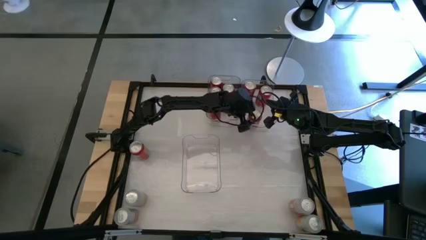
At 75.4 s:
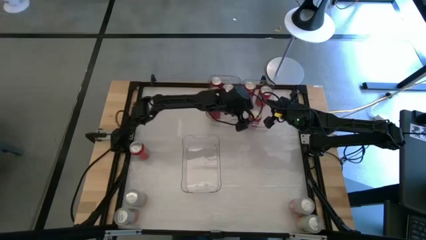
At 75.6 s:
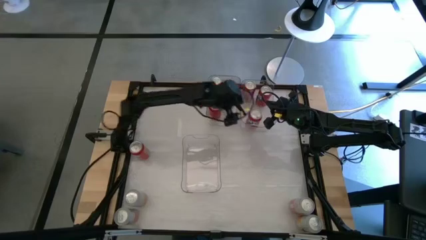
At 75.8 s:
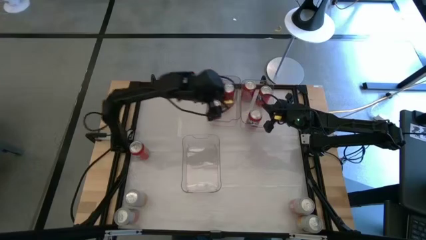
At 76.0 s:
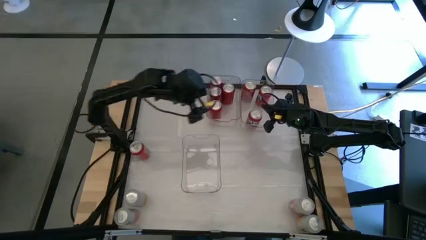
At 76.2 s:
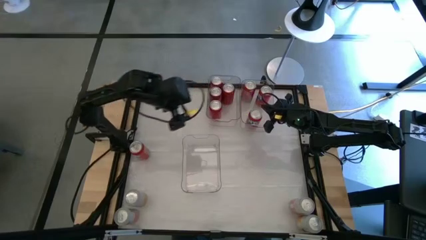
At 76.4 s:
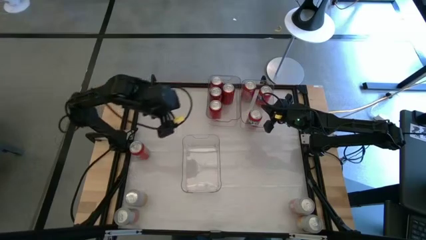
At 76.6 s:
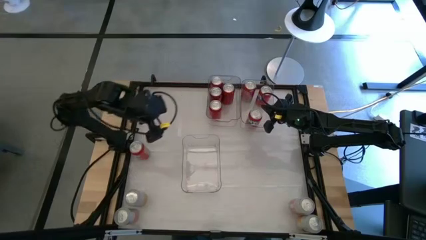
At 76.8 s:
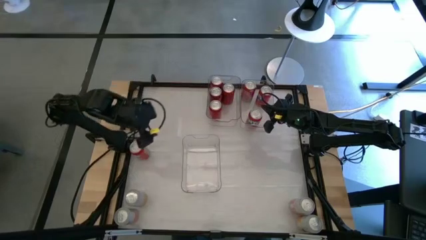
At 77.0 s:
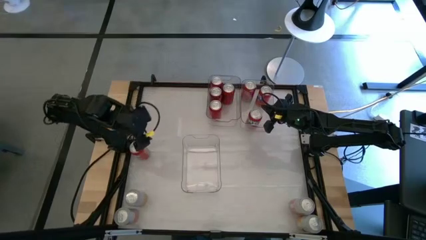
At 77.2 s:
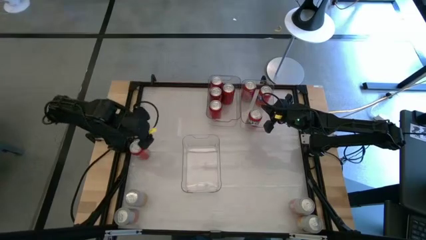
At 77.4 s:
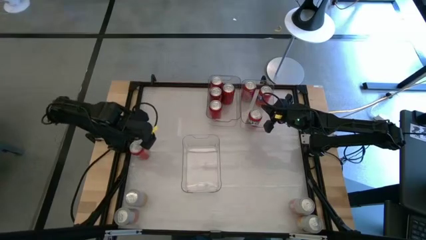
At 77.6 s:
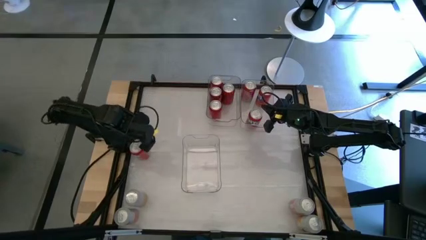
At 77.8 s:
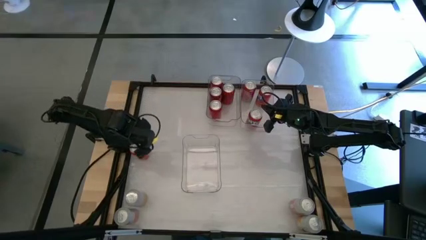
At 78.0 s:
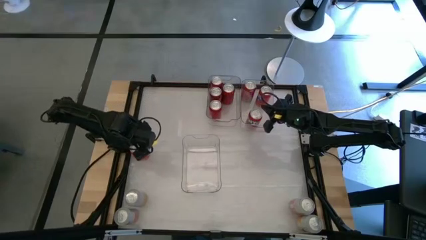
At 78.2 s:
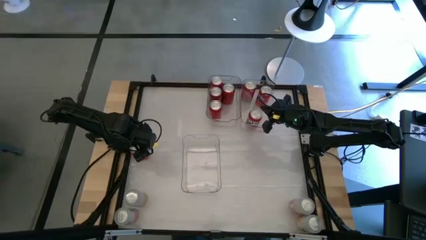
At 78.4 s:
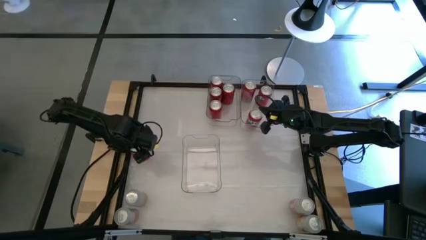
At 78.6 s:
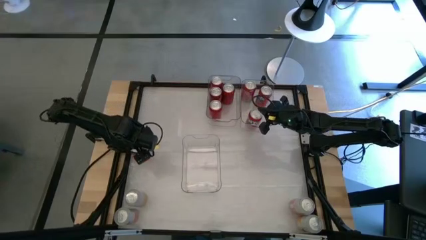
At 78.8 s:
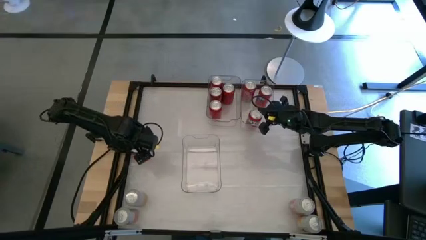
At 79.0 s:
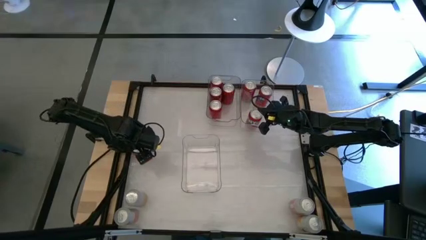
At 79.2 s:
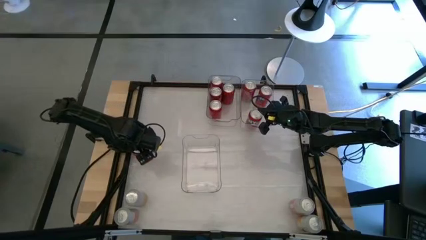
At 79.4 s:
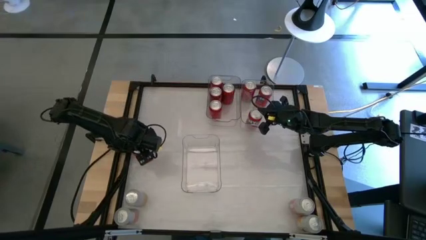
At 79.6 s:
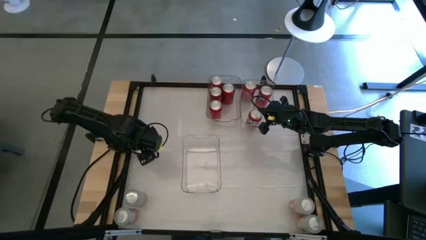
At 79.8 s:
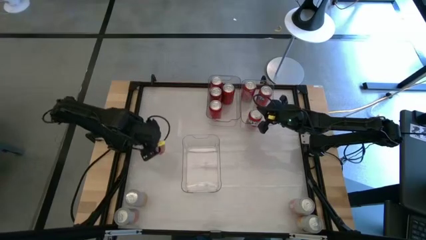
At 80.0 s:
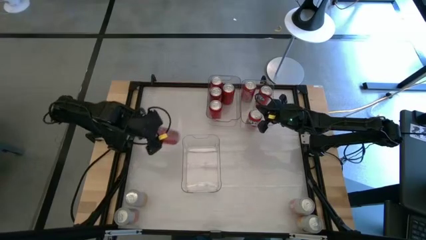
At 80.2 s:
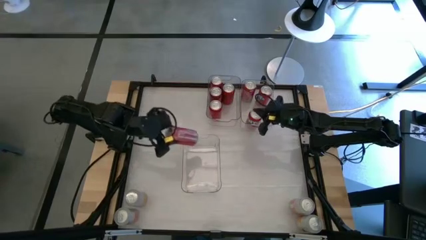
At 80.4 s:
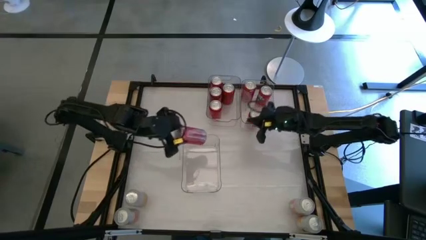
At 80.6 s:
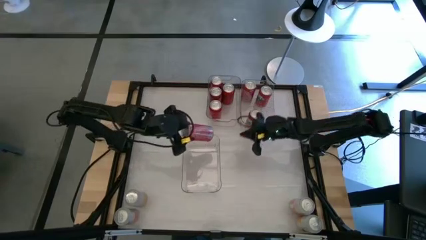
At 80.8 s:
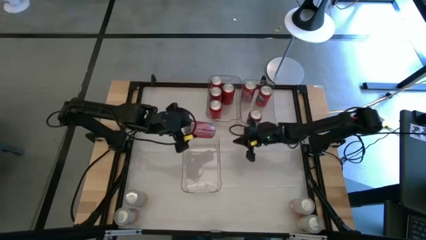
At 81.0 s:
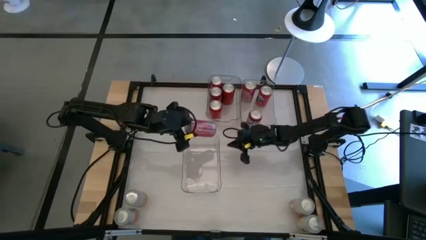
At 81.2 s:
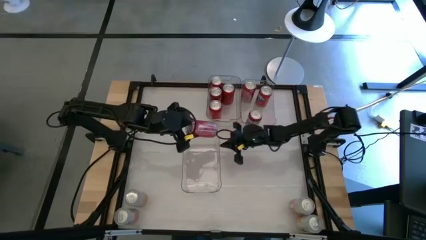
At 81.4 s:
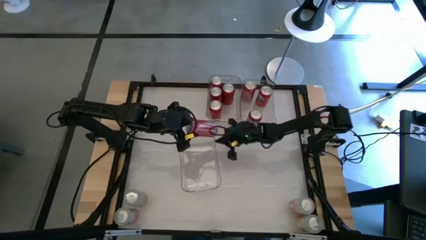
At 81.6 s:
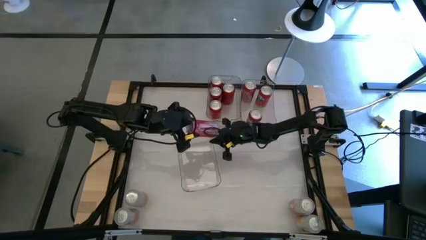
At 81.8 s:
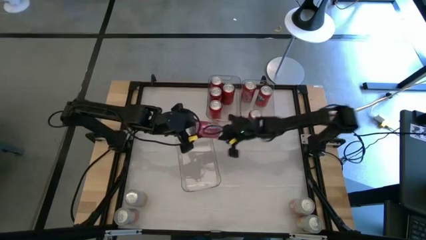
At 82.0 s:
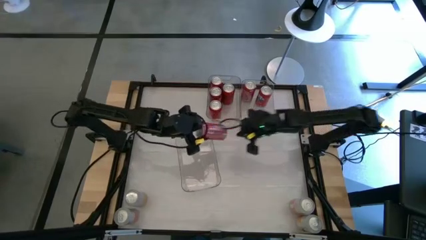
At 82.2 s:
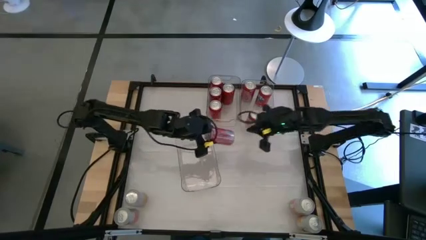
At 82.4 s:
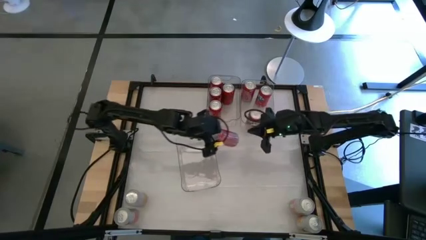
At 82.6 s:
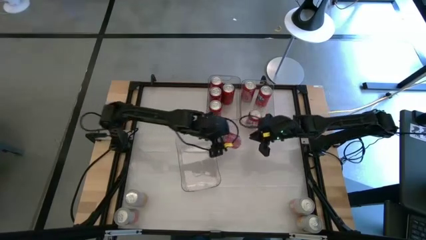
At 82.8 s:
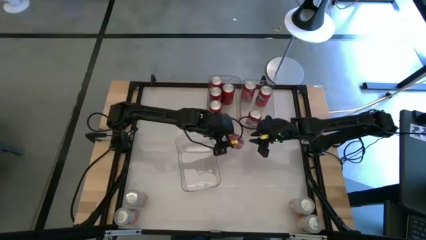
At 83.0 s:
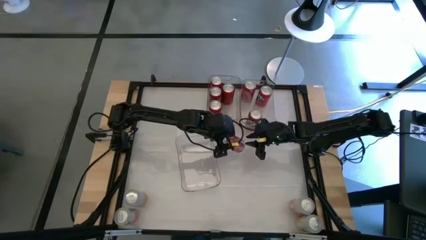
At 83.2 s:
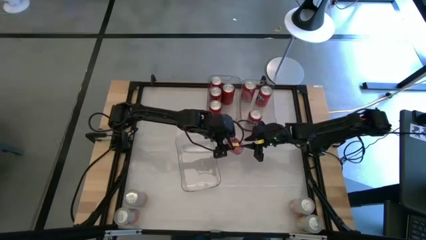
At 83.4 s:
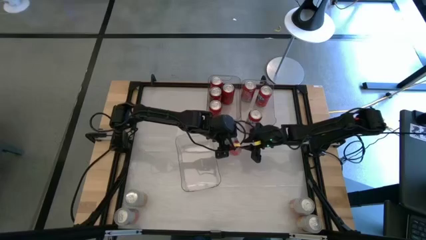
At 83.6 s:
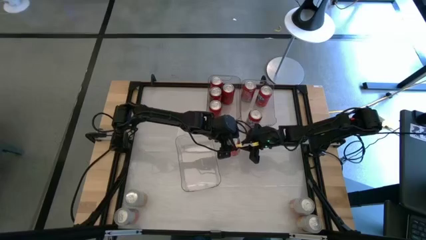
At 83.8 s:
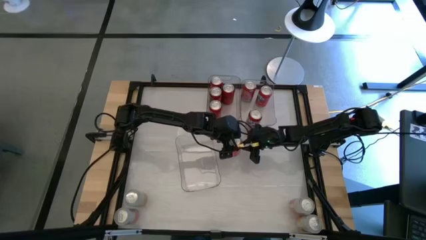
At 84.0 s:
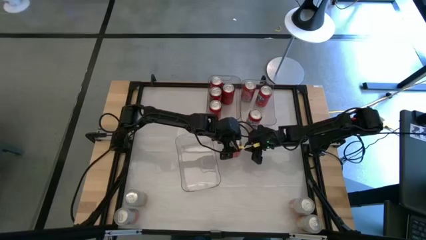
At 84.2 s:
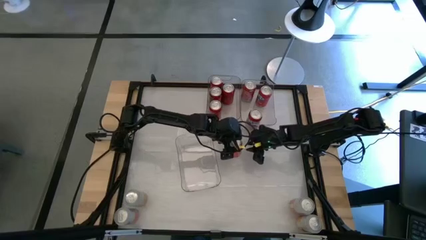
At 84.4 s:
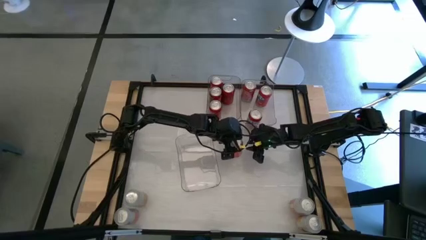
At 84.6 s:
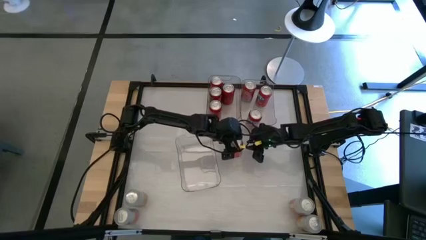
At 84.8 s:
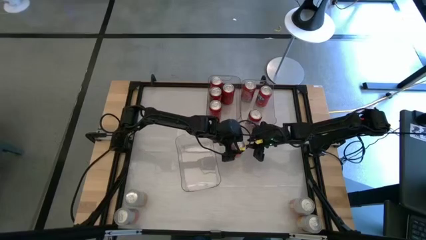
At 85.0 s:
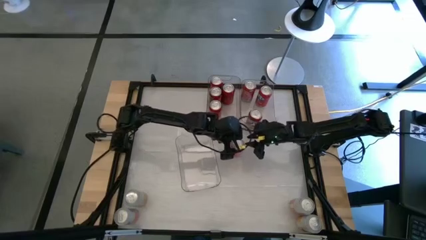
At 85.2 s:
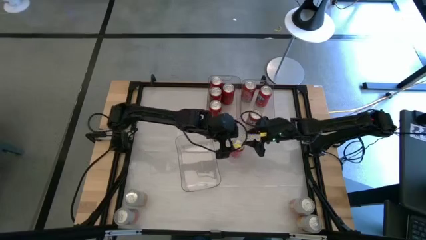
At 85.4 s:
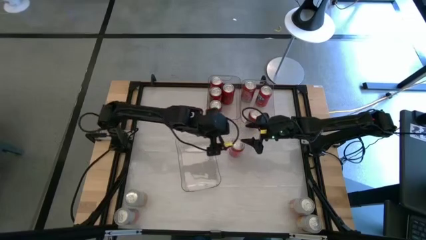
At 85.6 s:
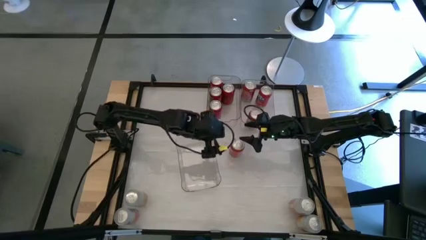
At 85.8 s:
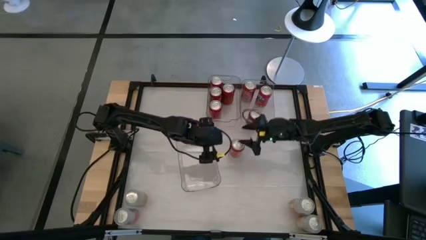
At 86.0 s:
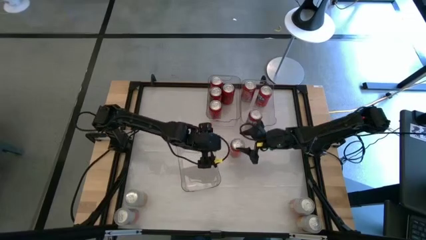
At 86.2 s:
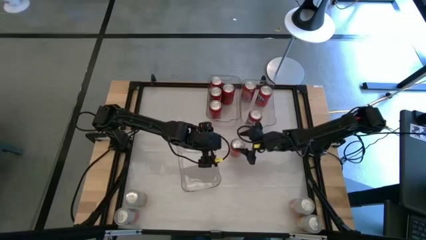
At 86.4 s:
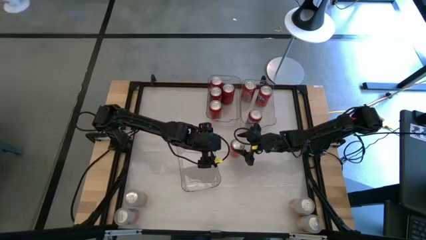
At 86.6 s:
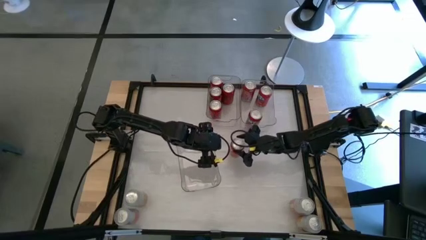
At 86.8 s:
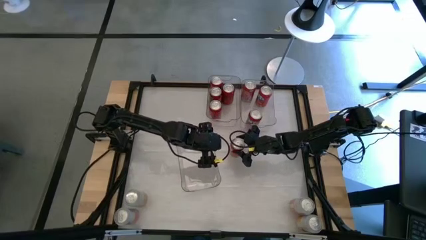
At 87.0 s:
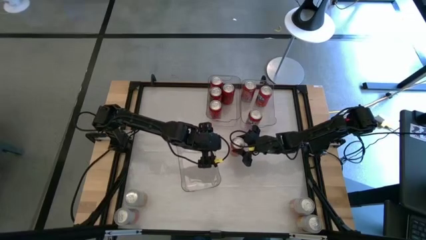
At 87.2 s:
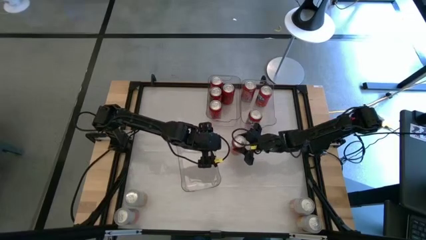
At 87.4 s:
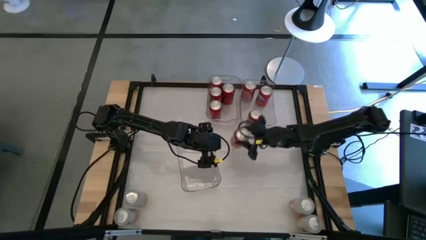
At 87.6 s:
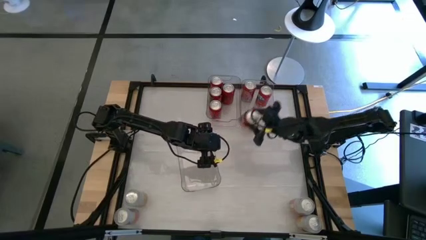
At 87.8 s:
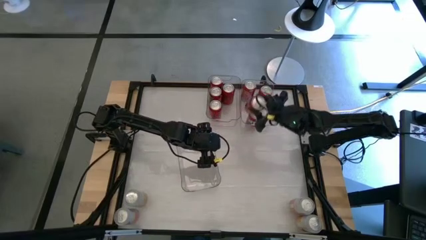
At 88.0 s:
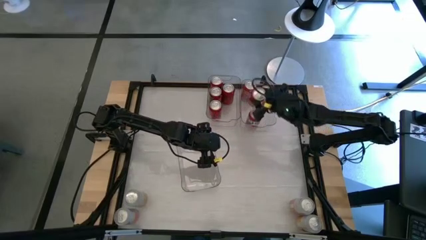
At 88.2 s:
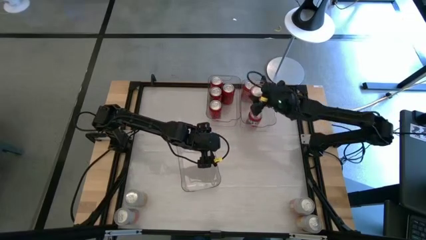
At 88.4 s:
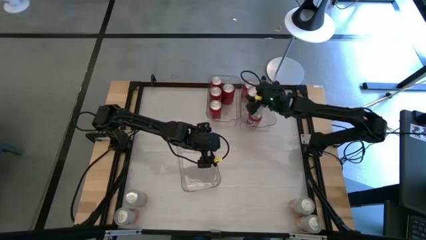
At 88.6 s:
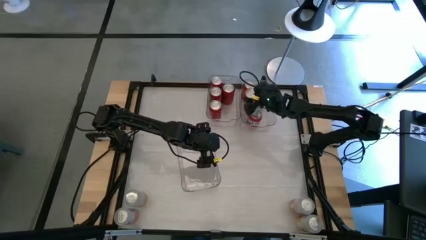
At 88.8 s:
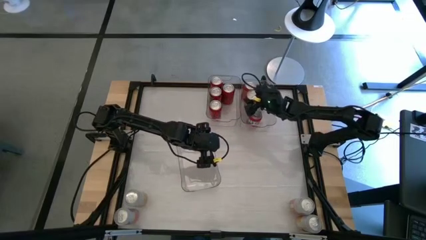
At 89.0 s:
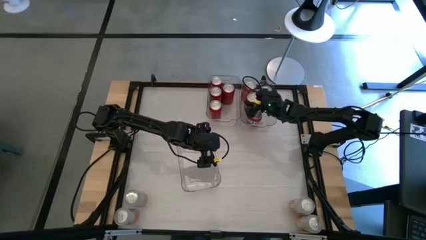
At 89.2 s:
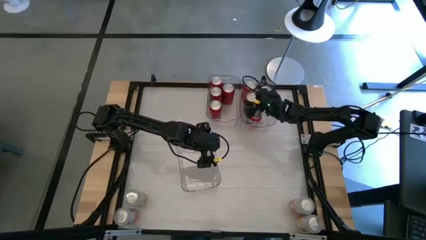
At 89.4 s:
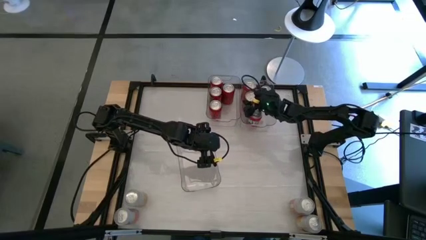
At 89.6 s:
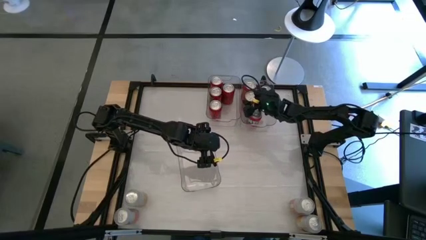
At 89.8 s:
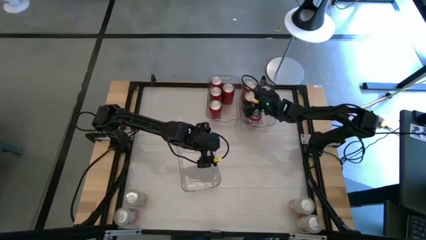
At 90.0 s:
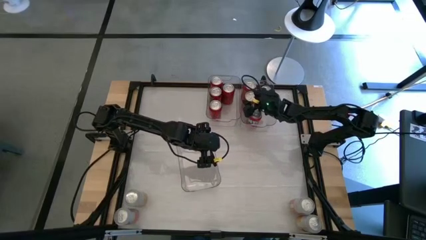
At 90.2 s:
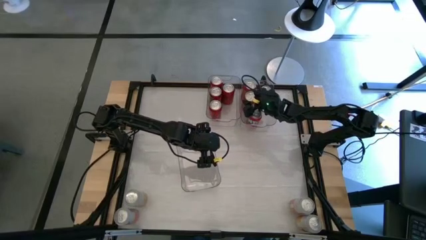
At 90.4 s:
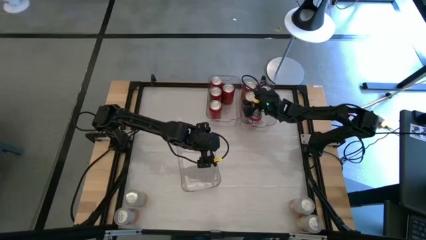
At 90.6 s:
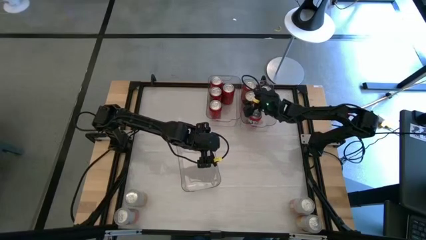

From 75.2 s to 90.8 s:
Task: Sort soda cans
Put the red soda can into the top right transparent bin
